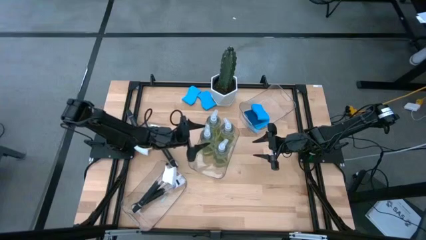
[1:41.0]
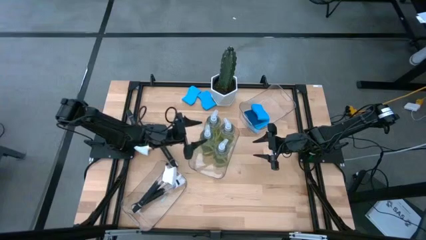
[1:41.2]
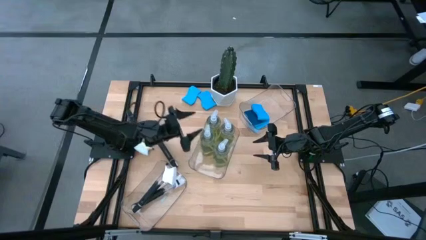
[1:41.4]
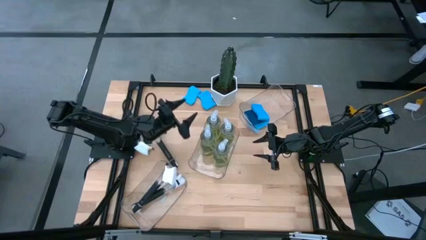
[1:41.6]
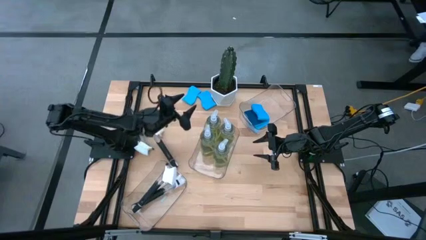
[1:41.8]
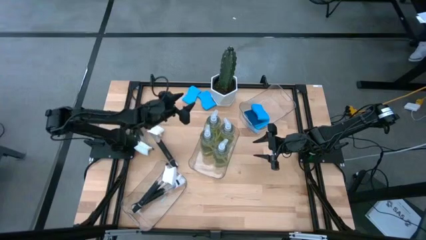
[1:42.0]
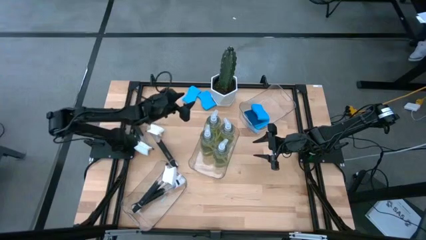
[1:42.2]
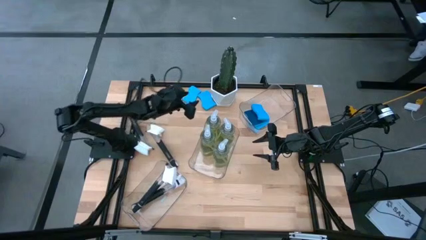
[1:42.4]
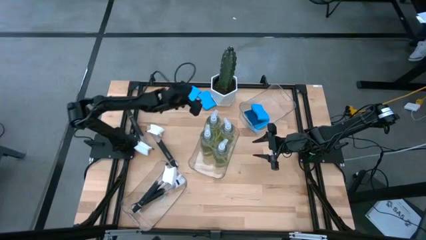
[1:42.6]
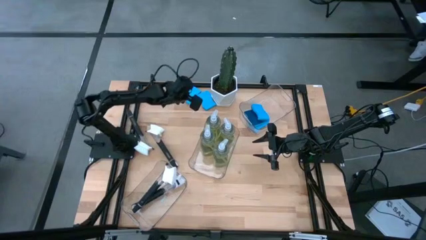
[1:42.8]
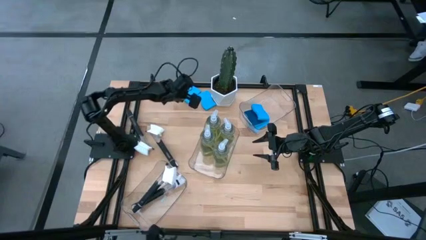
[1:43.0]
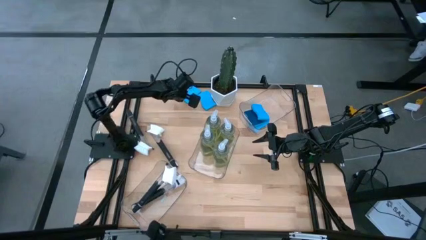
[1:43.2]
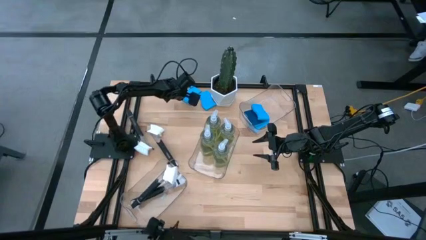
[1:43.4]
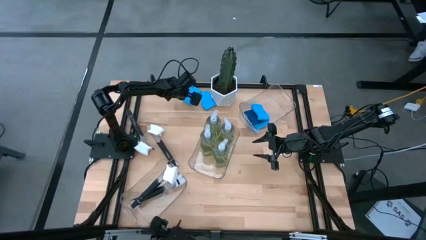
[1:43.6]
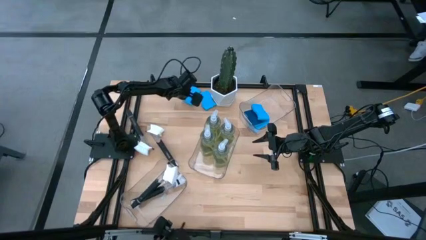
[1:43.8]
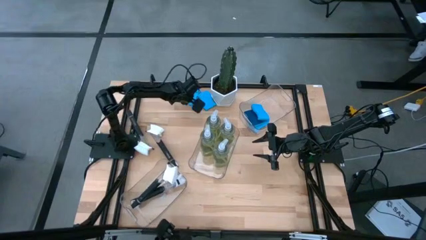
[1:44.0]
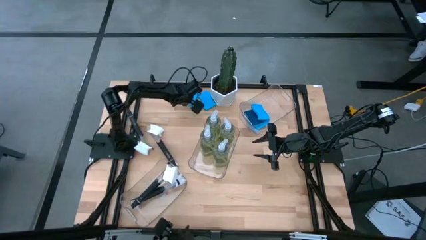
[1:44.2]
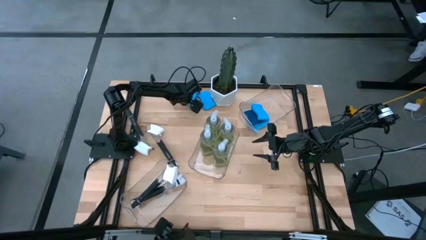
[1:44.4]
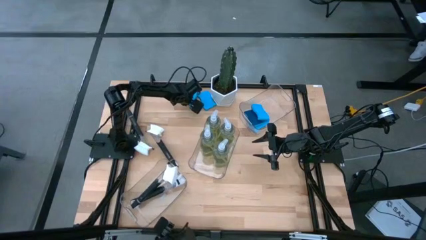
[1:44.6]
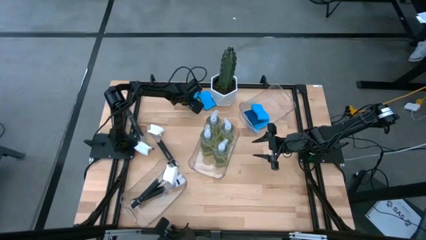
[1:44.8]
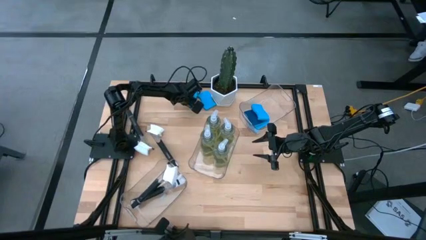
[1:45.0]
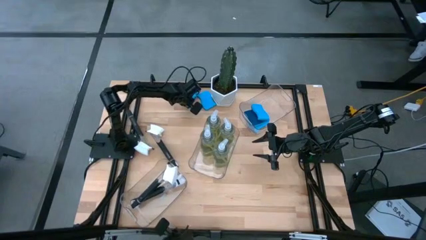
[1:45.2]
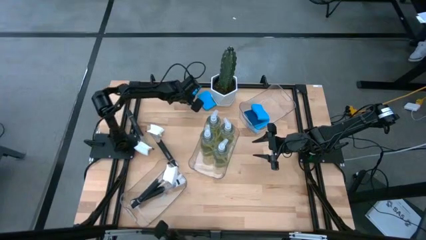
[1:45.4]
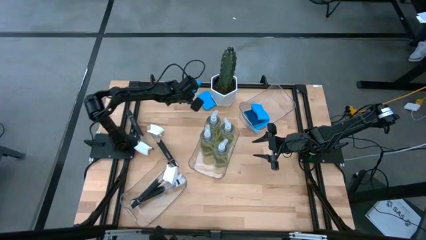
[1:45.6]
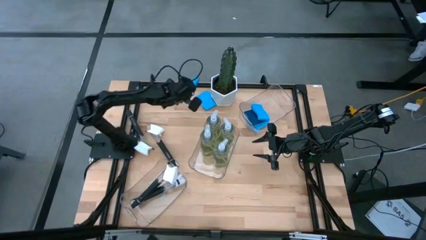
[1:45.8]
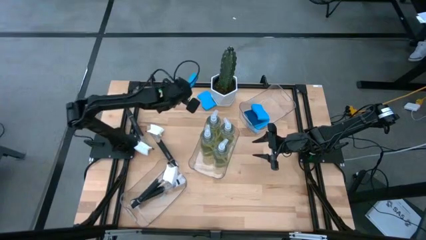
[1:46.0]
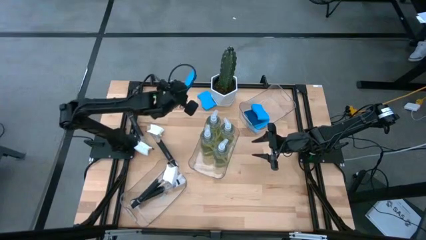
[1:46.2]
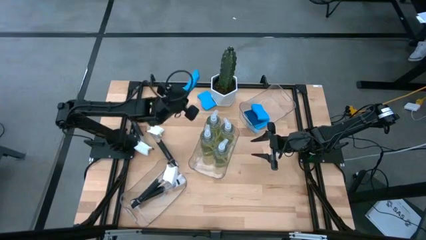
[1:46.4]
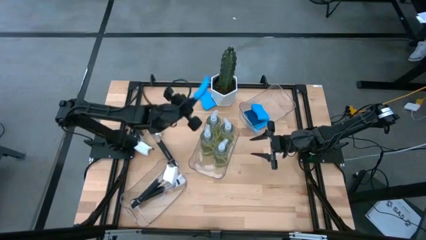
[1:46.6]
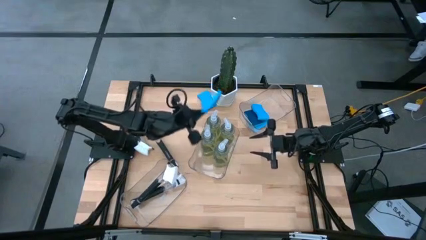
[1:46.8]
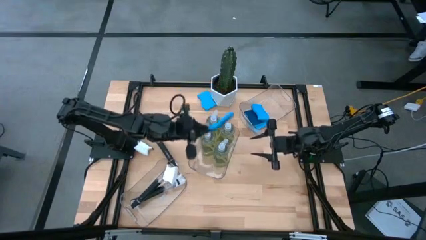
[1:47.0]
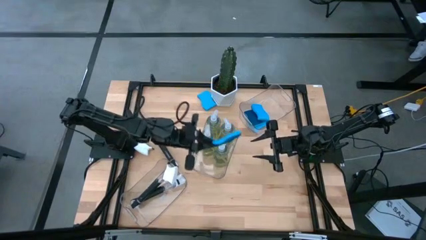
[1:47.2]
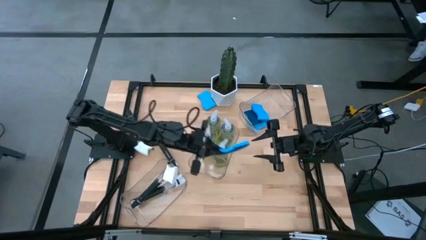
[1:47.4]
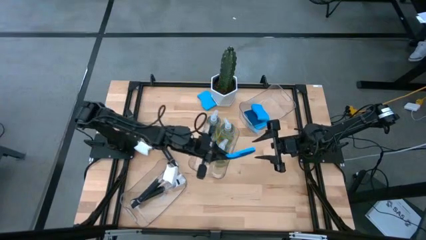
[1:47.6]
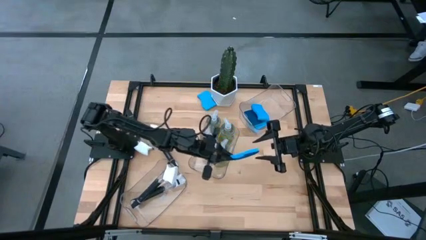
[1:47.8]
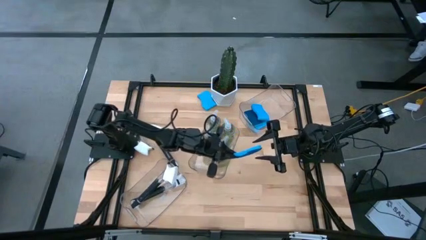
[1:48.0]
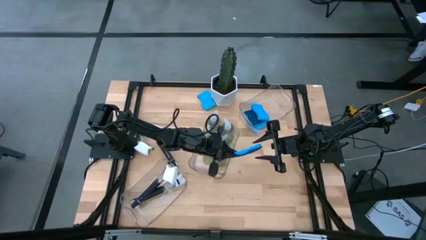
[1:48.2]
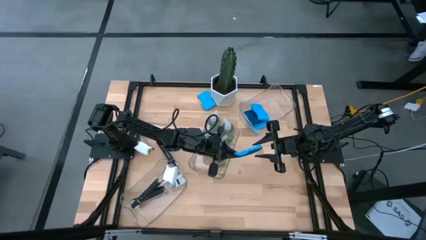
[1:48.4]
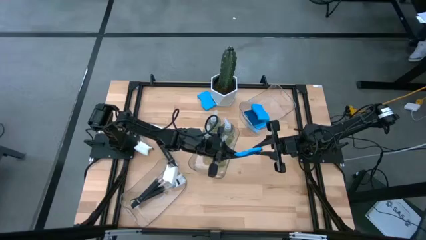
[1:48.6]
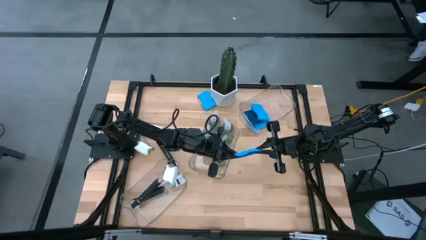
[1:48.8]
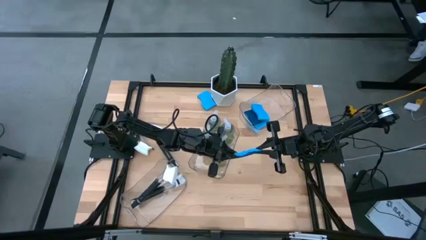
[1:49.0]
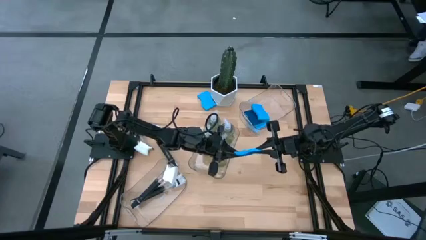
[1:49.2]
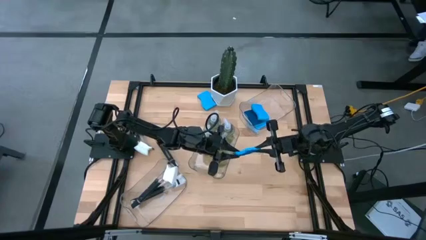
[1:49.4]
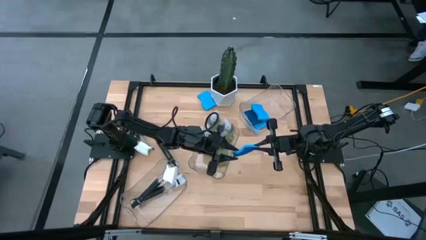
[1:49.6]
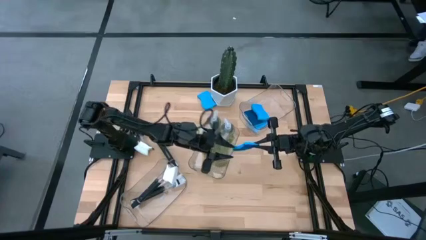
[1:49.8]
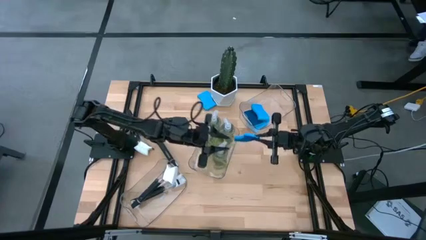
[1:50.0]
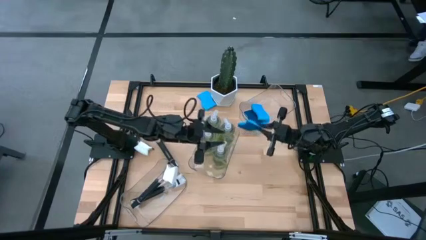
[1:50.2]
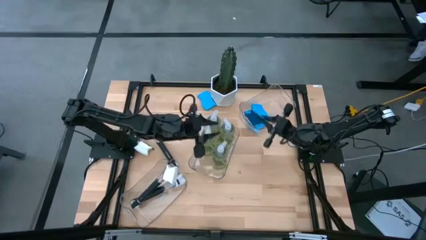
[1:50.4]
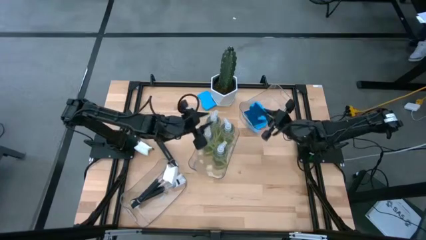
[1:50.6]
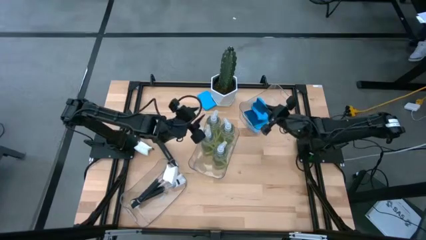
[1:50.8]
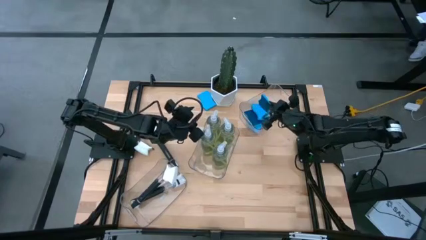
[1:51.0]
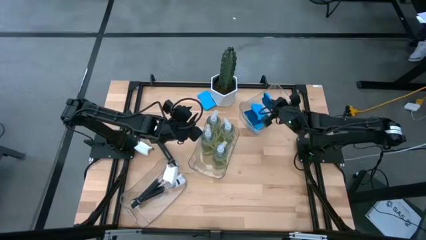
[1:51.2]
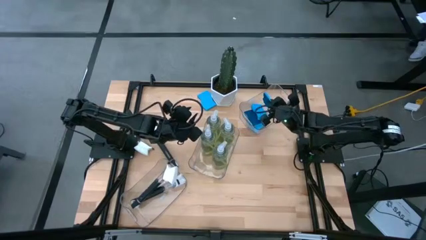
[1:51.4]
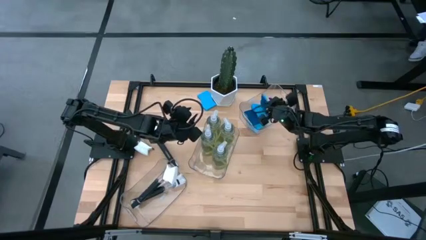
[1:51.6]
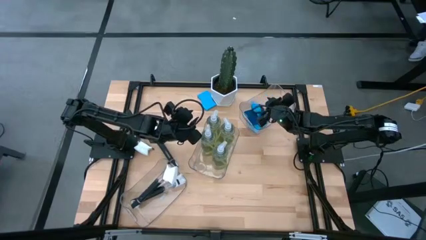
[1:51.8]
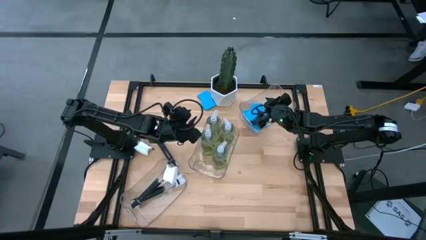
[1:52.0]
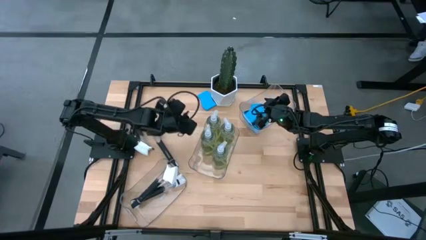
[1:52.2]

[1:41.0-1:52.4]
Task: Pick & Place Kitchen Sink Supplies
Put the blue sponge into the top transparent bin

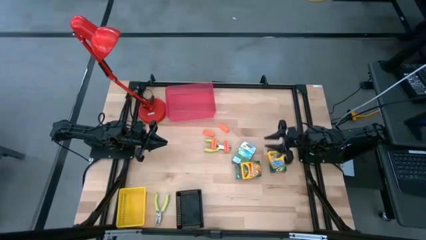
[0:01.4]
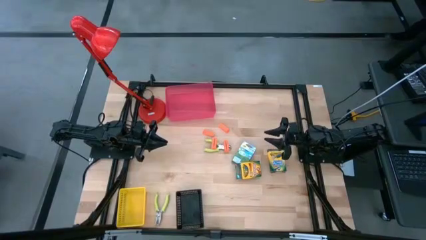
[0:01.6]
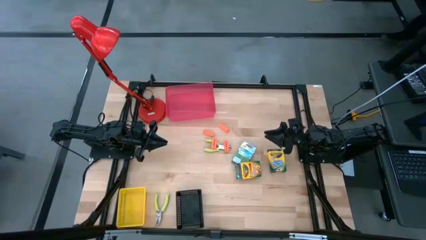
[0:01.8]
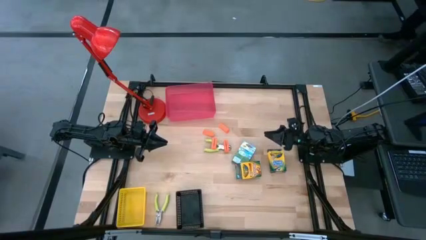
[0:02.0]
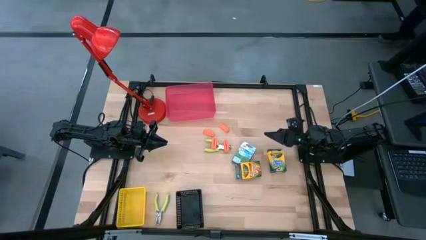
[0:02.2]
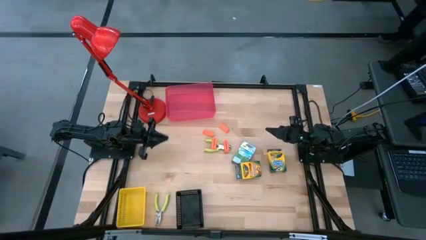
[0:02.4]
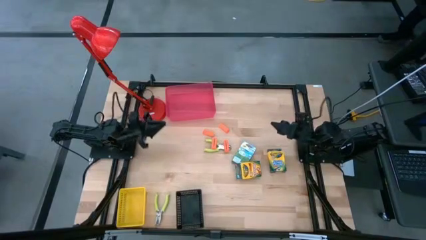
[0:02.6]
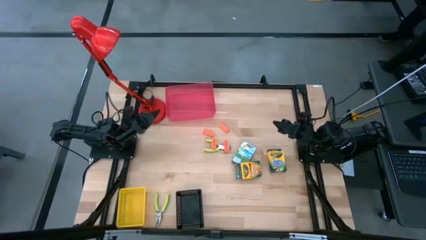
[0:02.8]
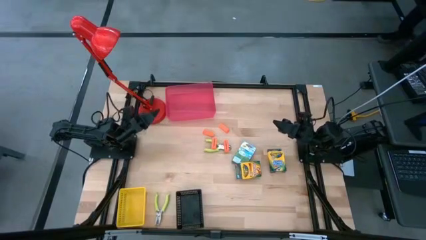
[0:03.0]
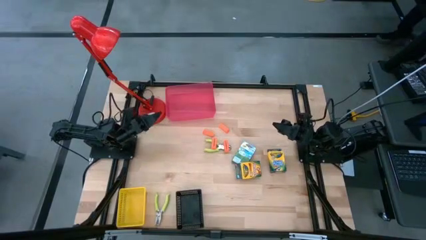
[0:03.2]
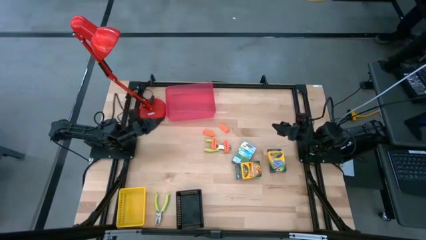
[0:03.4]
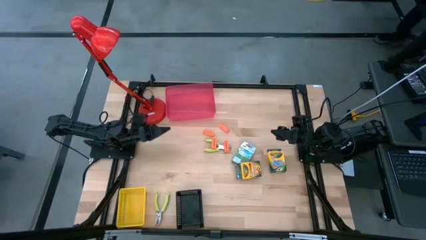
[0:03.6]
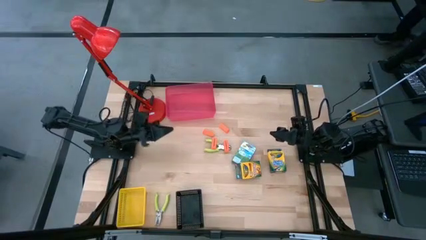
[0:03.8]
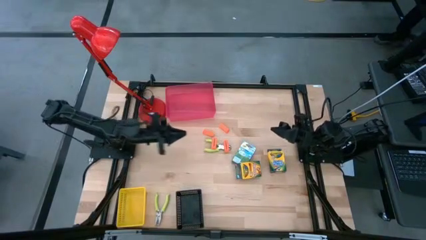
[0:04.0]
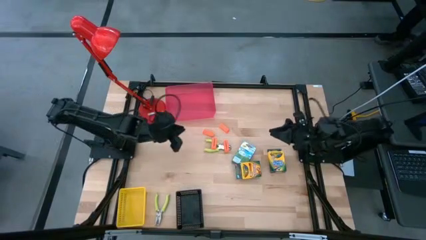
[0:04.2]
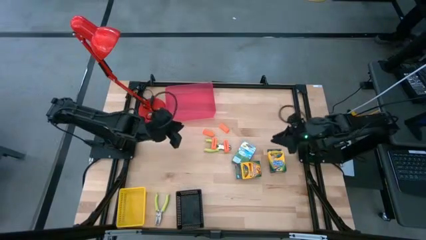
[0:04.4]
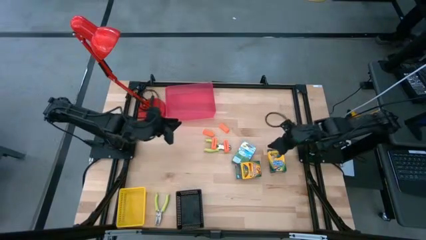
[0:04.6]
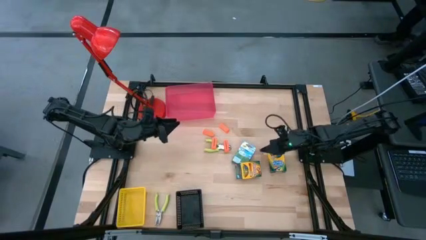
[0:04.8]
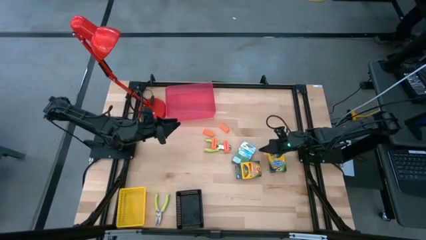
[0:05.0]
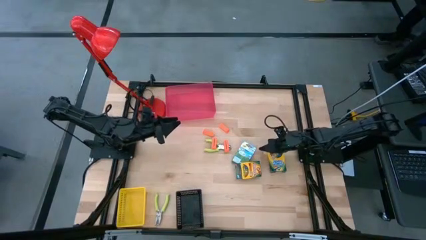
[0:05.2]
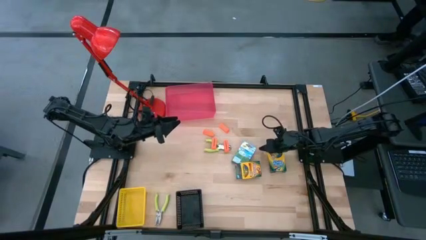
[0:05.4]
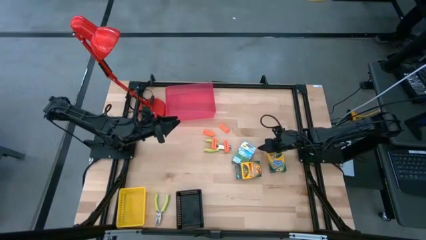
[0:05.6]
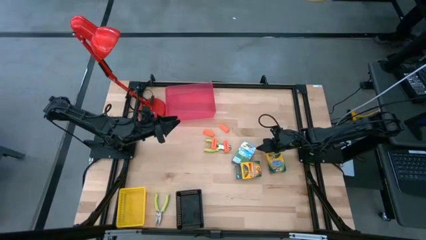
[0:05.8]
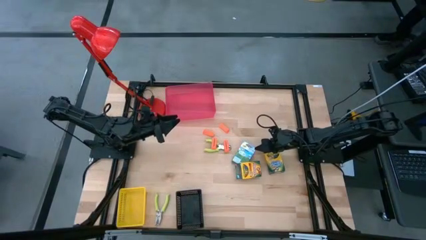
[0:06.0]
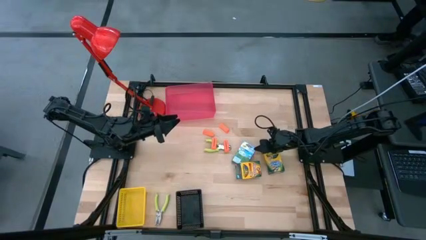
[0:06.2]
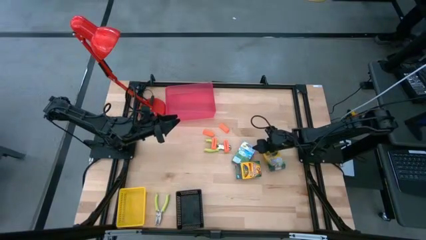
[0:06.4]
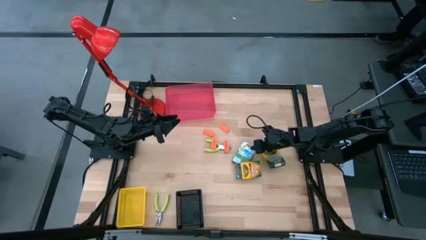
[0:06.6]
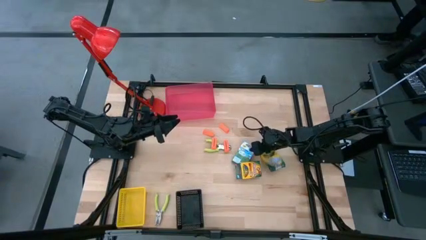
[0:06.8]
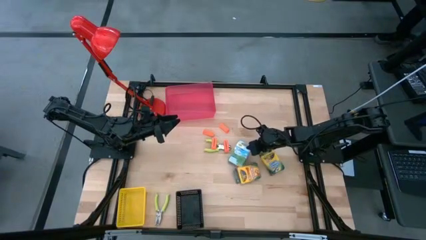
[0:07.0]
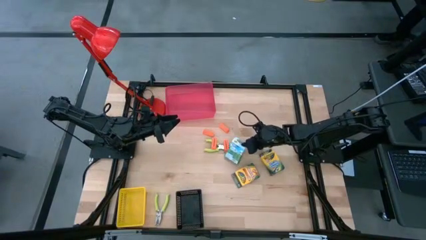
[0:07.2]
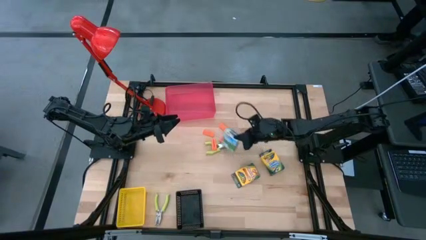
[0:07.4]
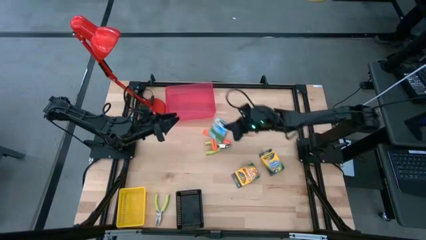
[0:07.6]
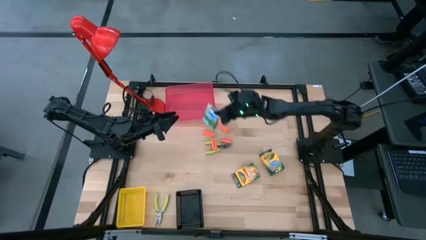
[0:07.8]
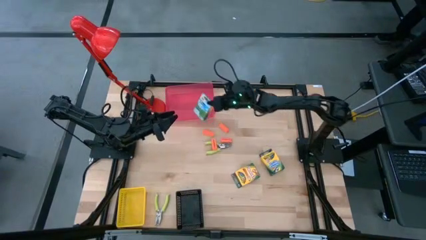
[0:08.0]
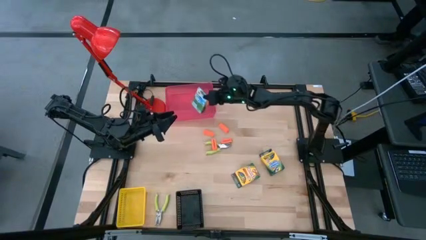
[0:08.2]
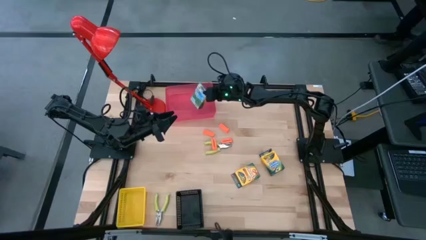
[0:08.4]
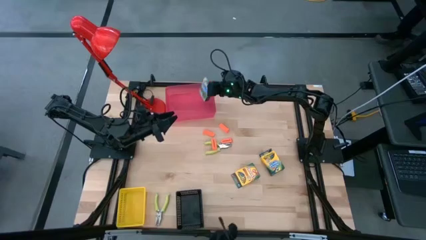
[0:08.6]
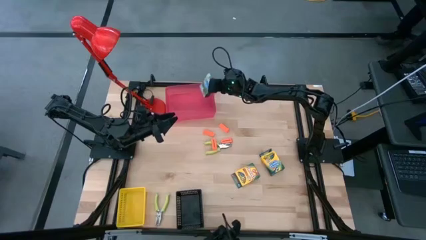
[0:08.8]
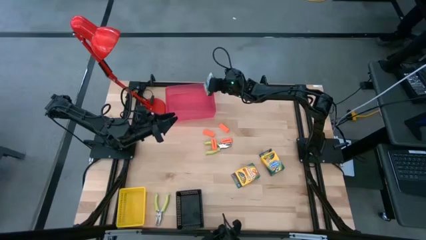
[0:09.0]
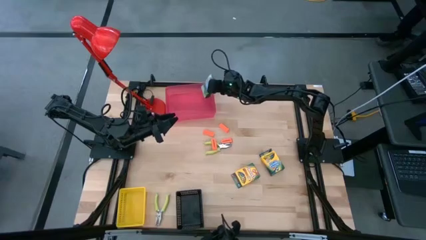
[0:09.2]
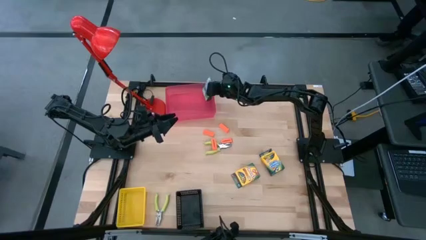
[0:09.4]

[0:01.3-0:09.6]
Task: Pick & Place School Supplies
Put the crayon box into the red bin
